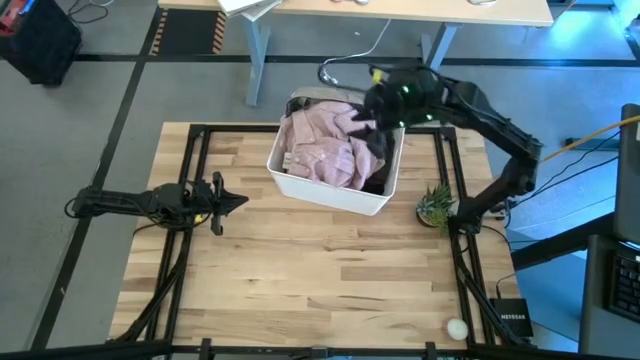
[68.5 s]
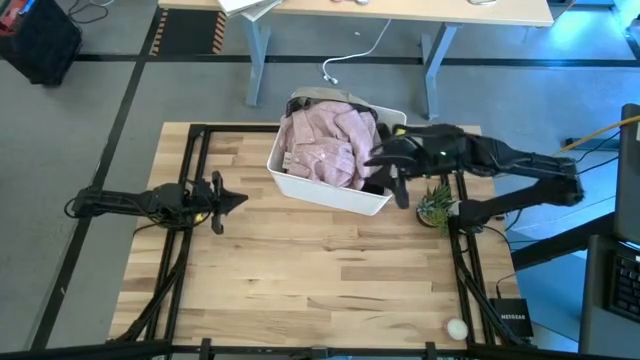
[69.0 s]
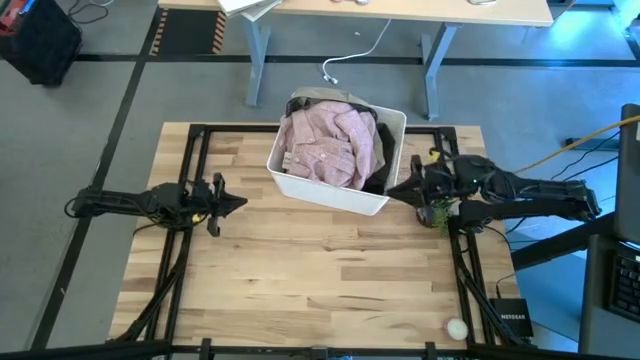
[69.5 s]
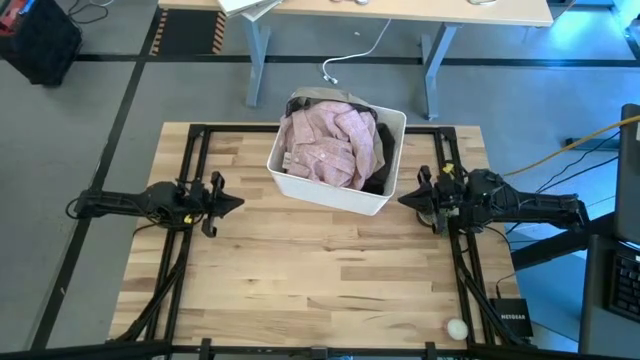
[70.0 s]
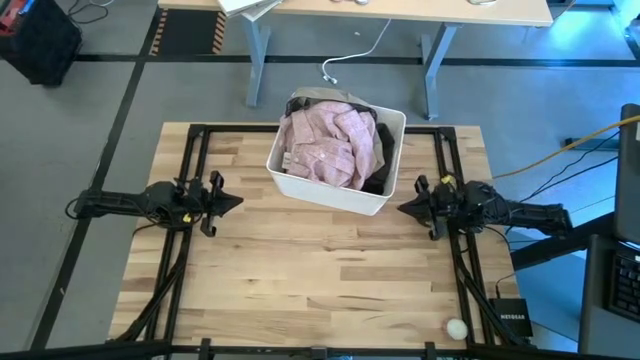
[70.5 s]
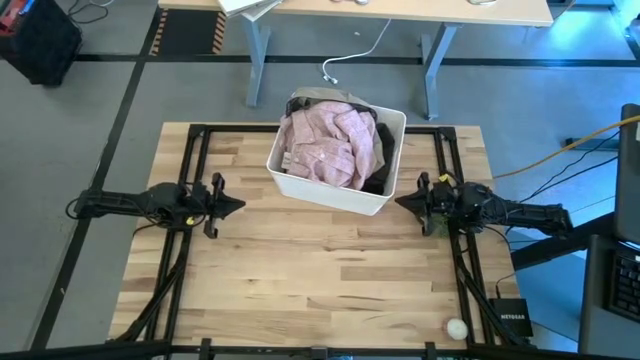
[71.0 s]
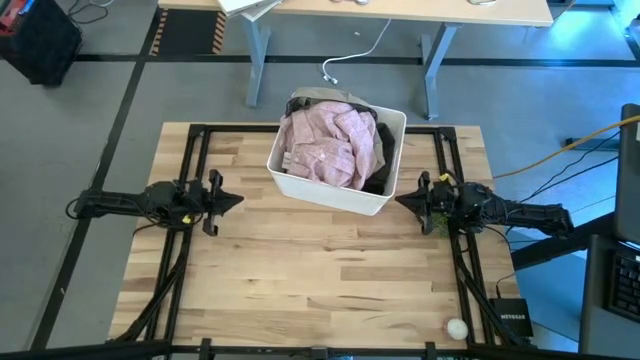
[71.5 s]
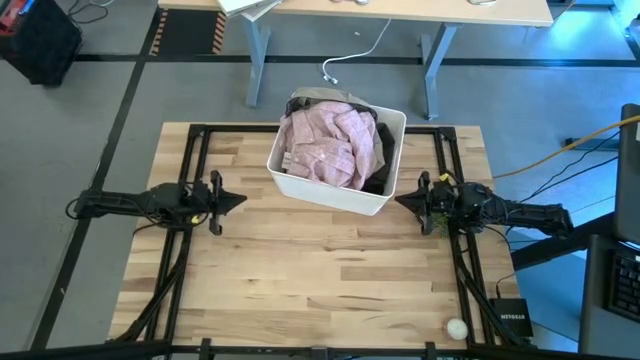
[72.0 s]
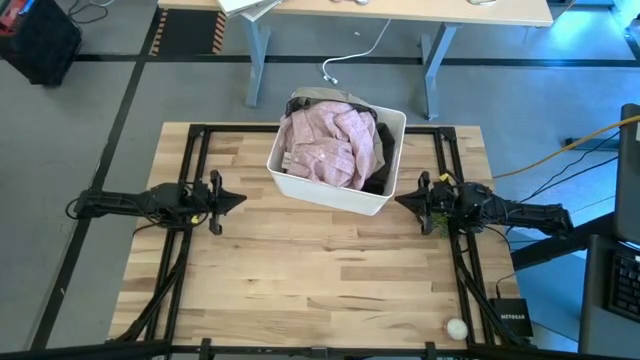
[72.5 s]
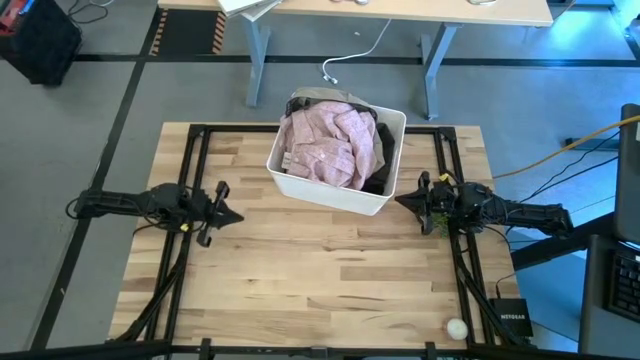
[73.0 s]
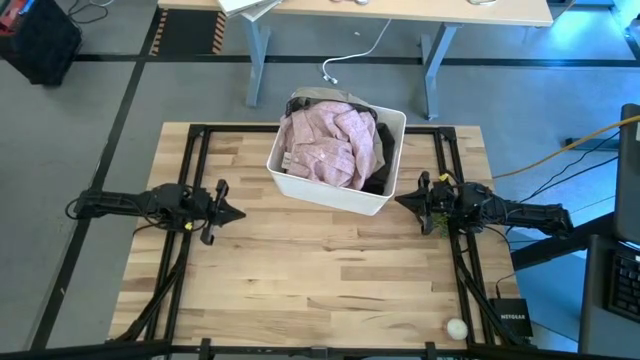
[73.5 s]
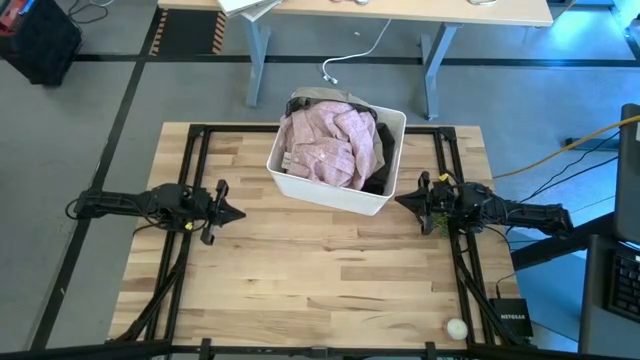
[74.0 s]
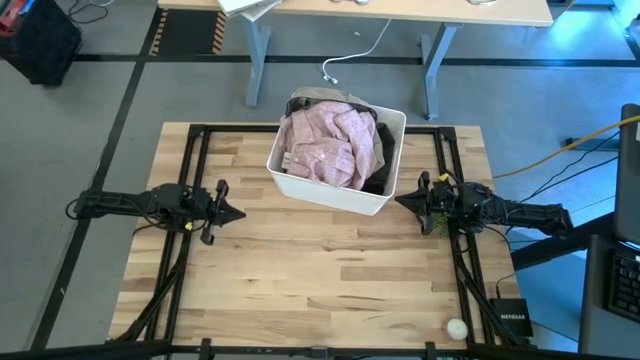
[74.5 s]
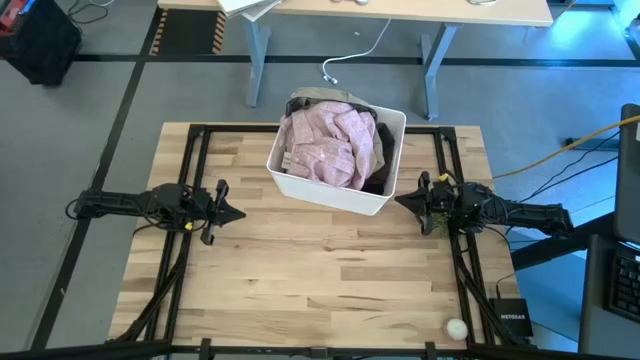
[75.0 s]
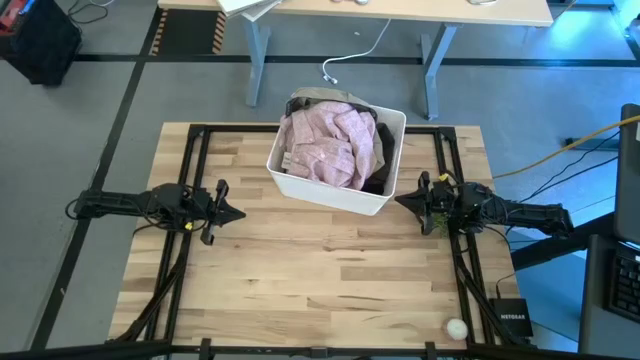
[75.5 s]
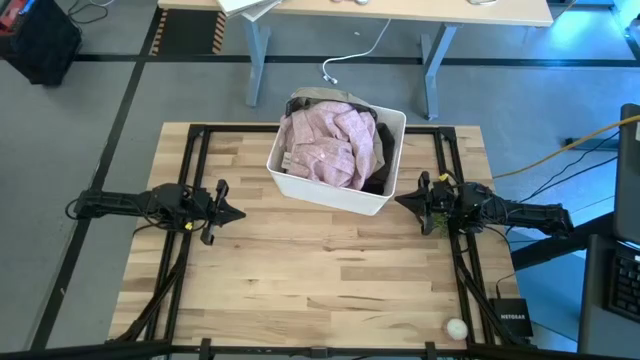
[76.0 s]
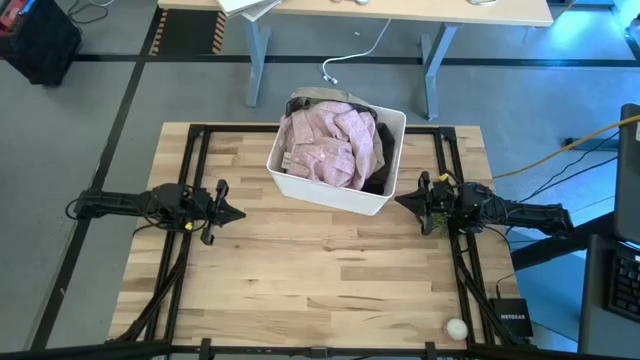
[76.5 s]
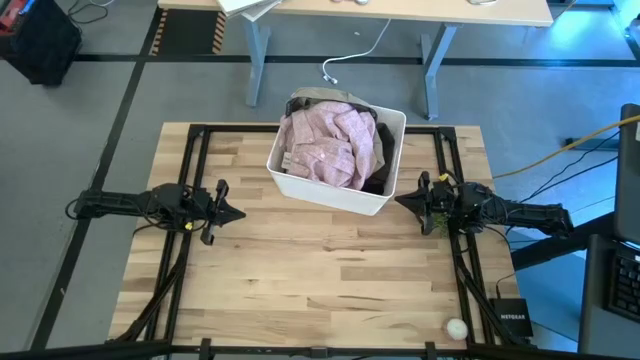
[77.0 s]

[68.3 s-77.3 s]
Task: Sort clothes
Return to Home Position

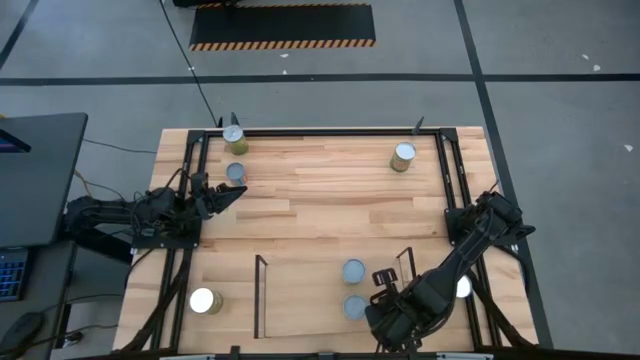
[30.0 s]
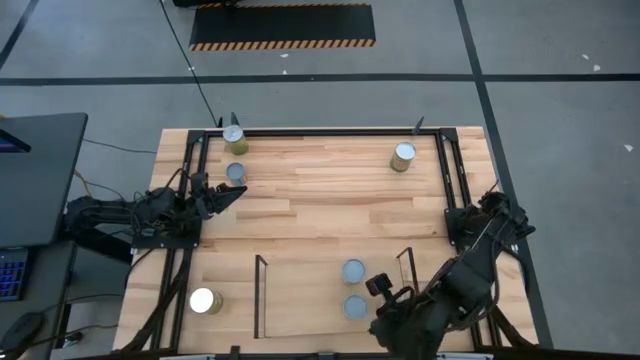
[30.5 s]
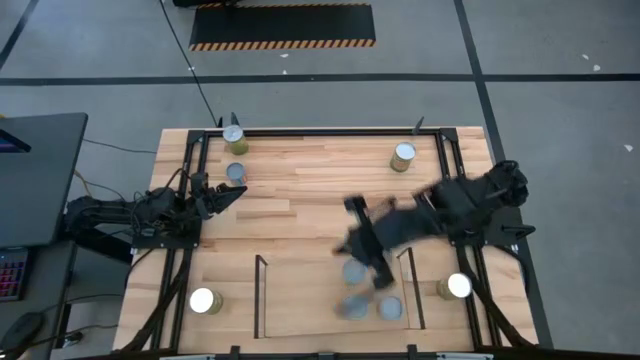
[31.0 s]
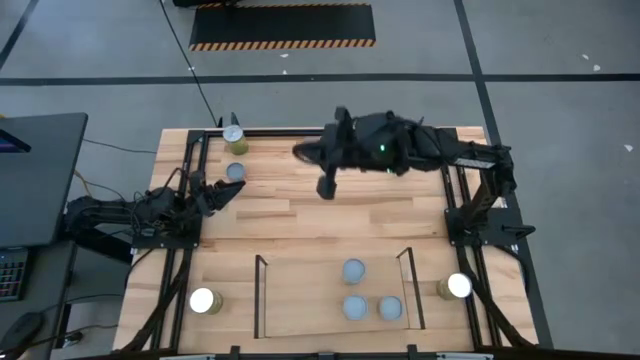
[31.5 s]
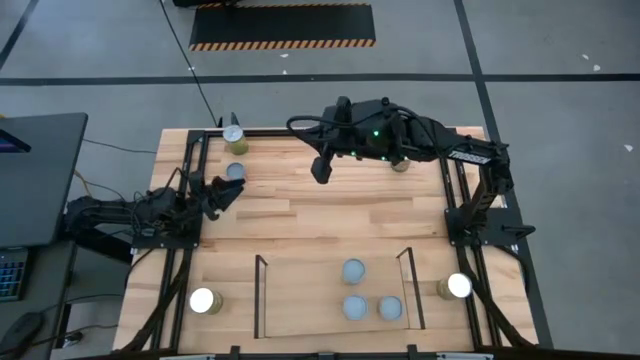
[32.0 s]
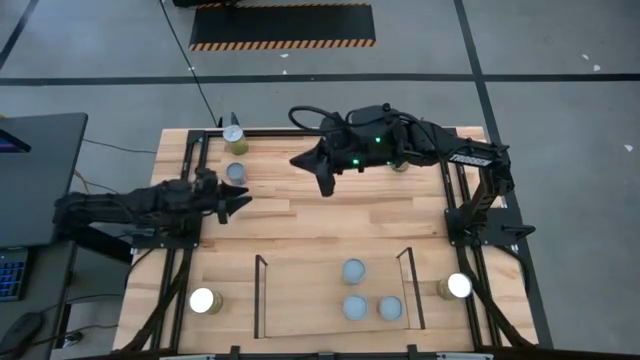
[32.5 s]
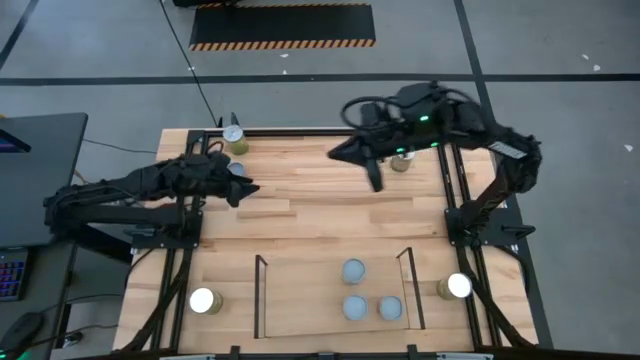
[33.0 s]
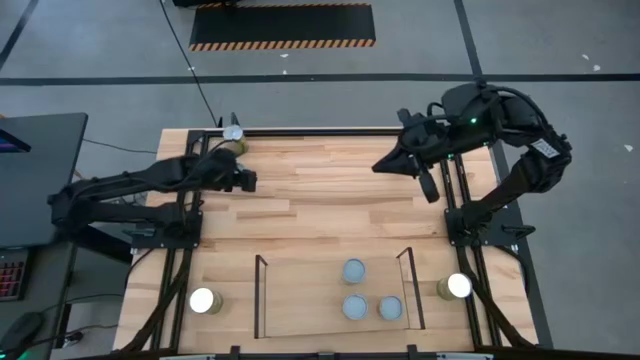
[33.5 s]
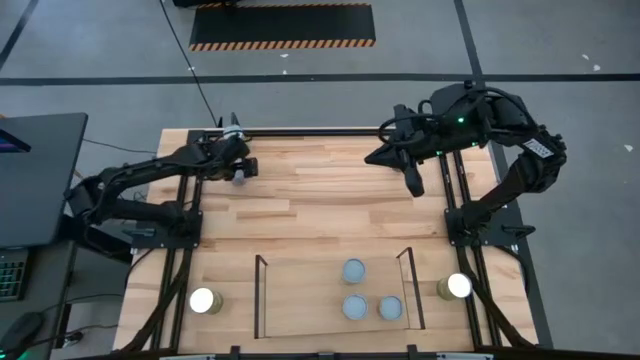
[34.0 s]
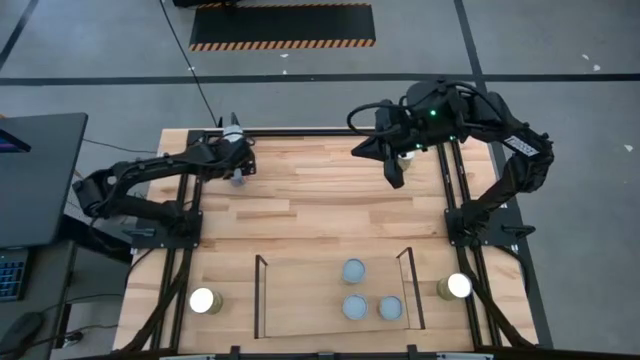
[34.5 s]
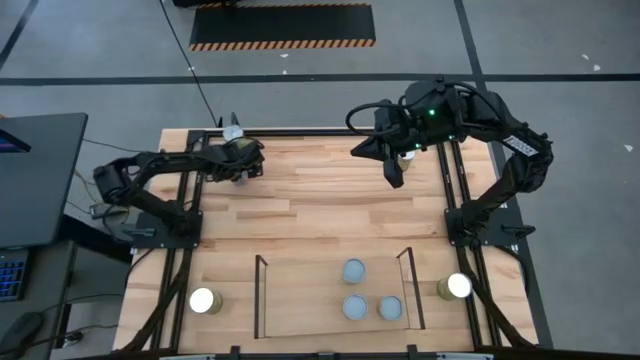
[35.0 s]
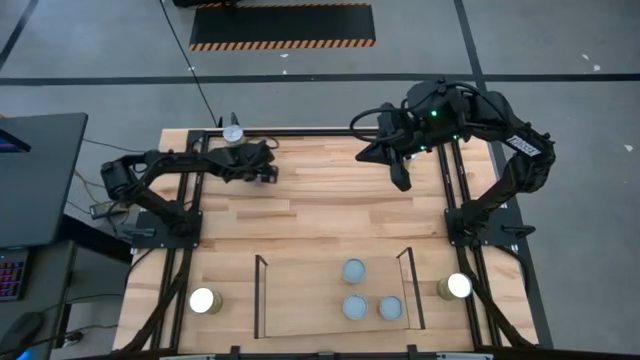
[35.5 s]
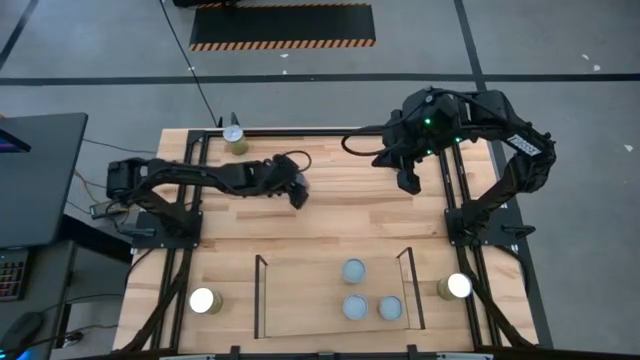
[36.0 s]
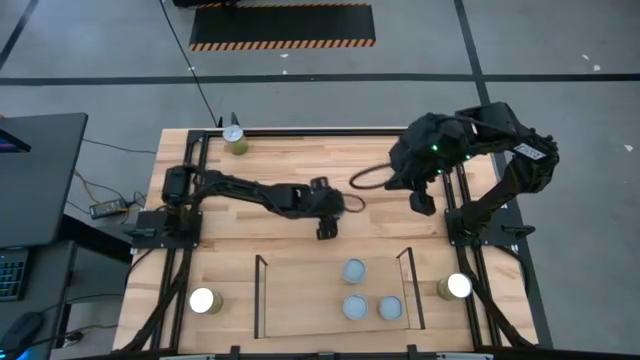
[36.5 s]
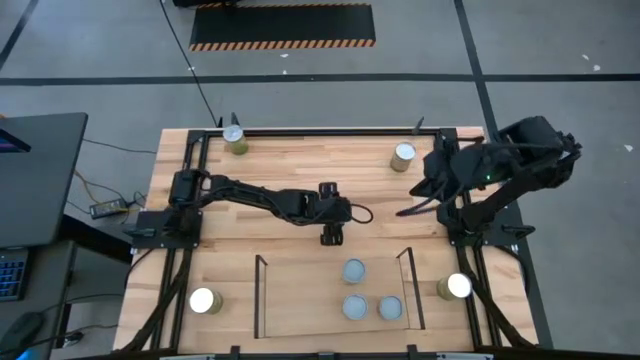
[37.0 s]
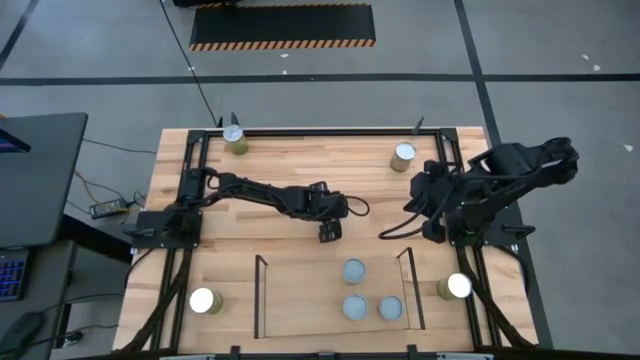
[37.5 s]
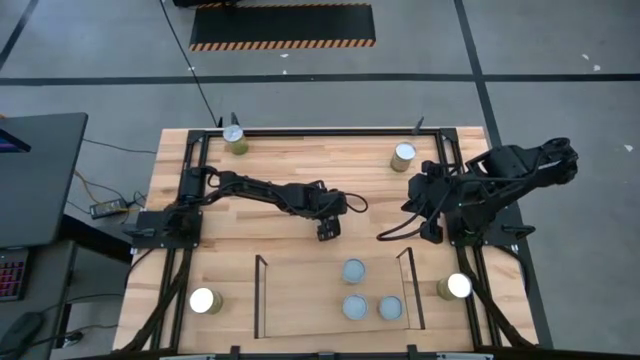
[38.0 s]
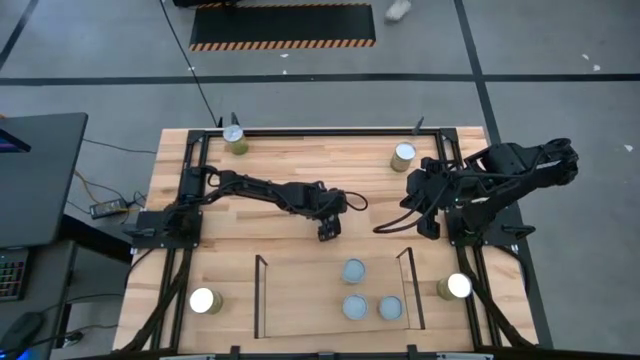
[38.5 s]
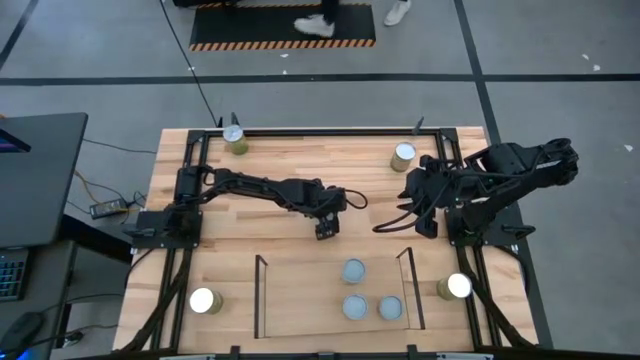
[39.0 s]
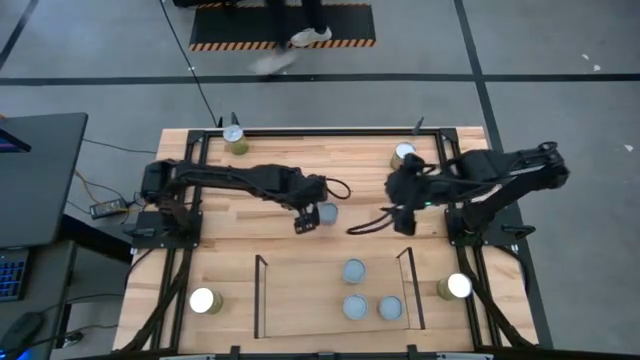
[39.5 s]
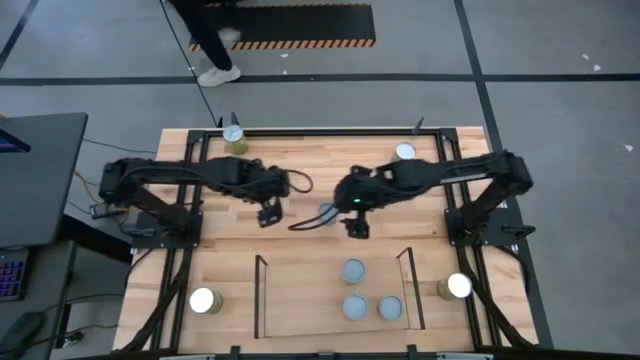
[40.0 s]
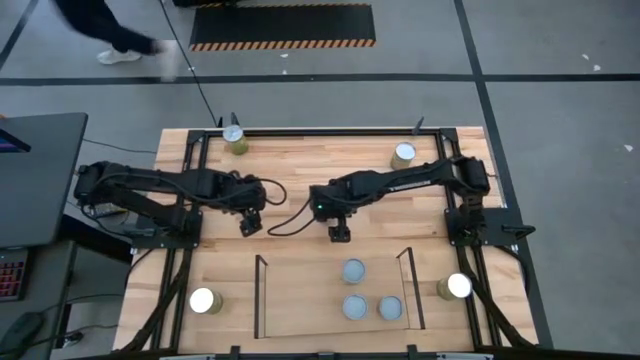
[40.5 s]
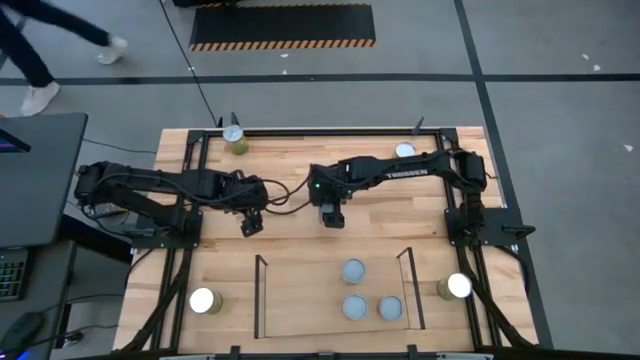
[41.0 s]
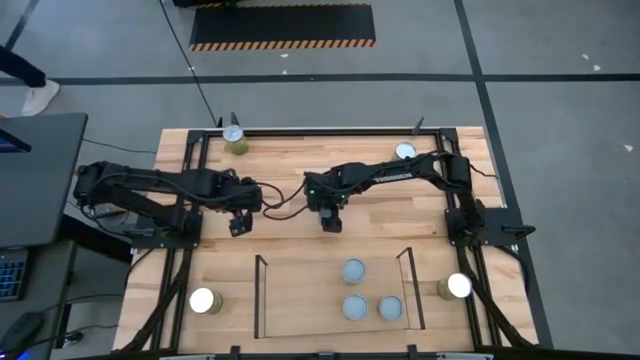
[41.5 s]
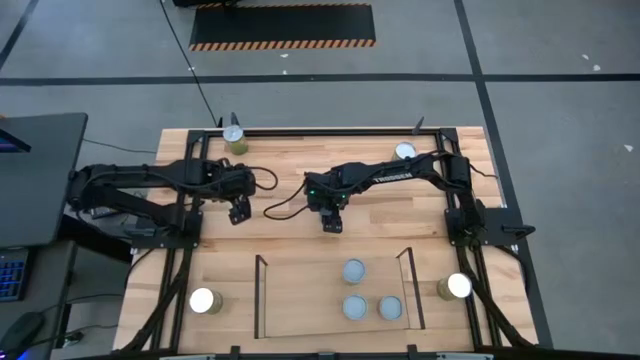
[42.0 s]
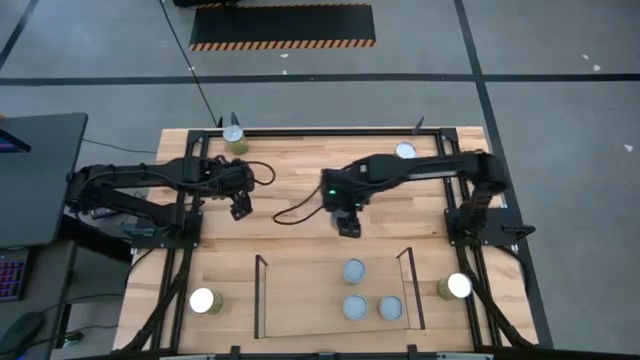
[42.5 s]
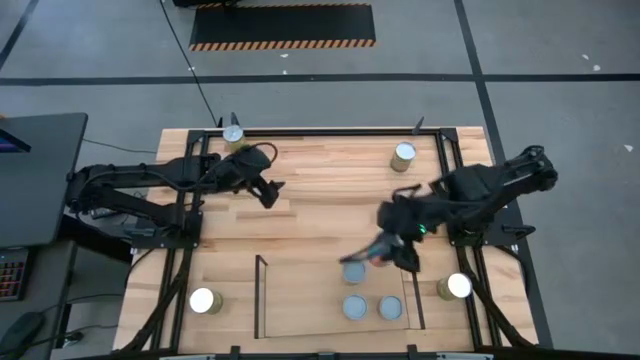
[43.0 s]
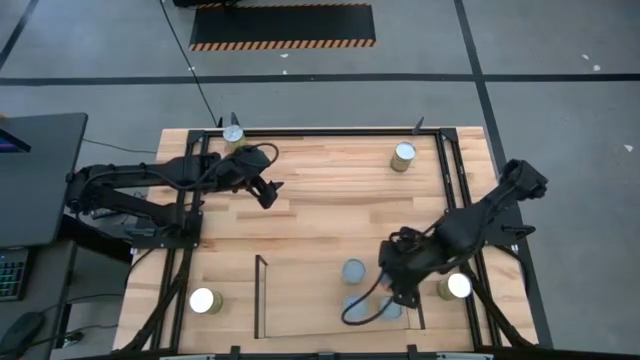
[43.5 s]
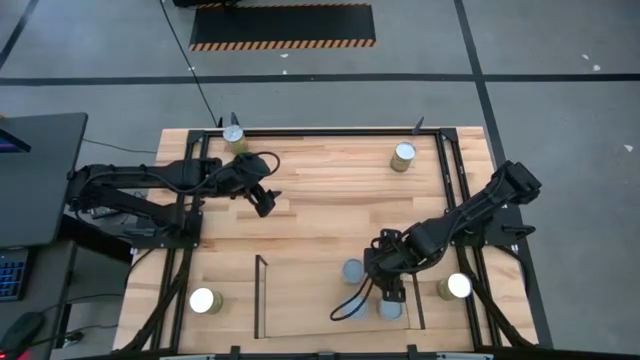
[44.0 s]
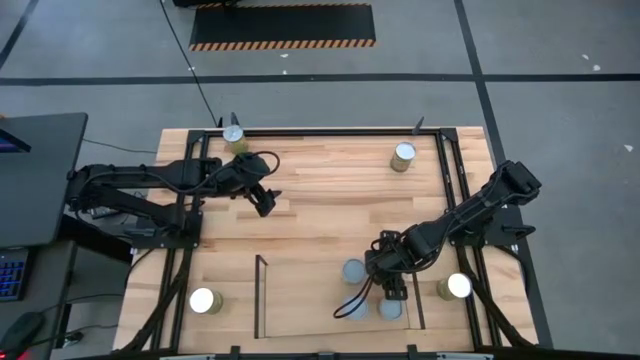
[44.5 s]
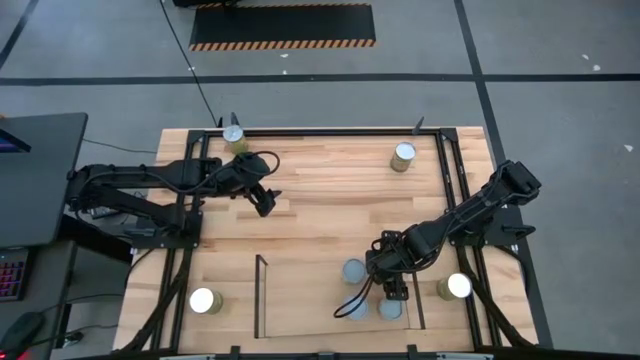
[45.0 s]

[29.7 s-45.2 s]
Task: Pick and place cans onto a shelf
Put the canned mixed corn on the shelf
